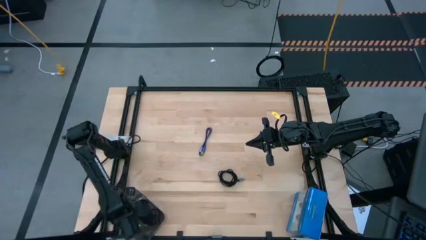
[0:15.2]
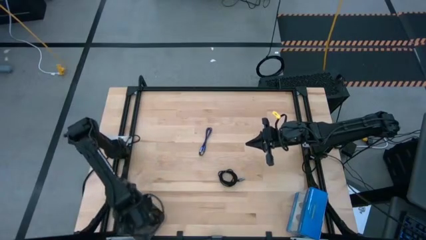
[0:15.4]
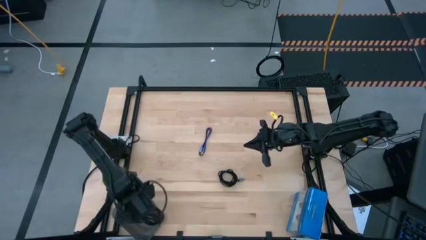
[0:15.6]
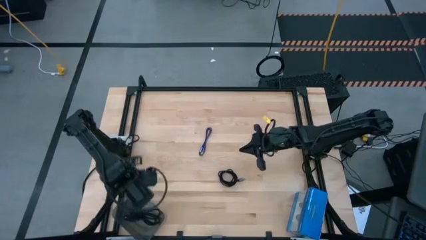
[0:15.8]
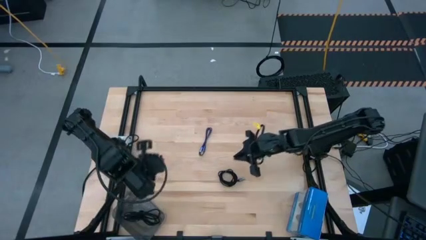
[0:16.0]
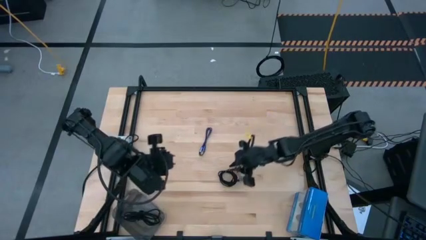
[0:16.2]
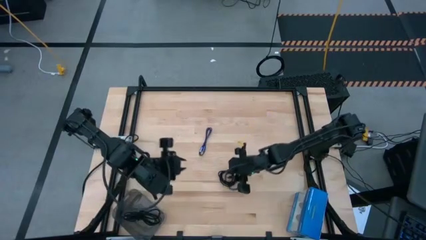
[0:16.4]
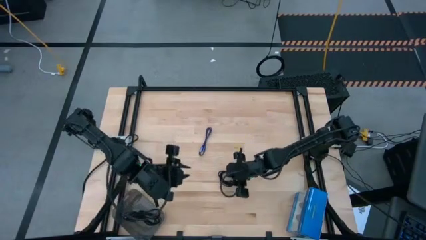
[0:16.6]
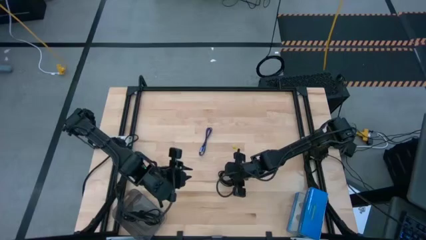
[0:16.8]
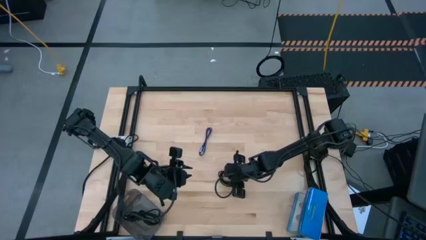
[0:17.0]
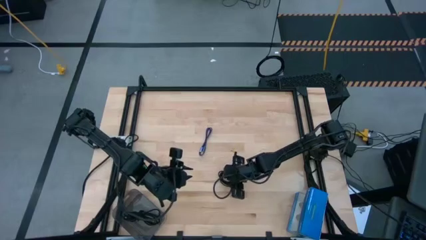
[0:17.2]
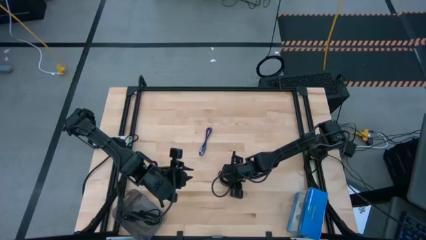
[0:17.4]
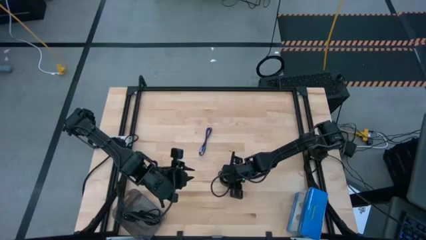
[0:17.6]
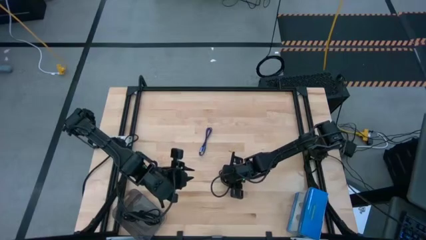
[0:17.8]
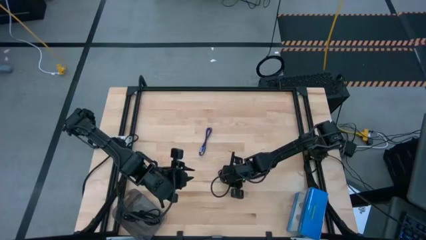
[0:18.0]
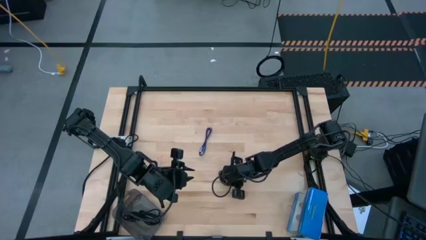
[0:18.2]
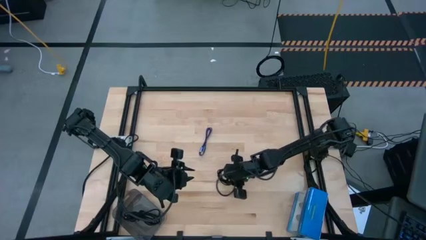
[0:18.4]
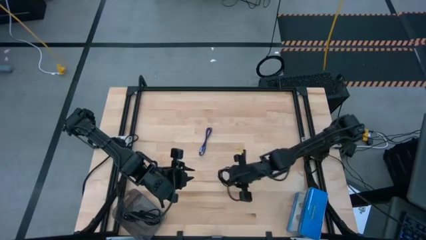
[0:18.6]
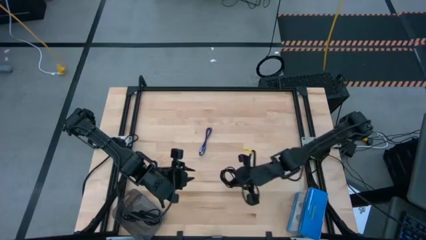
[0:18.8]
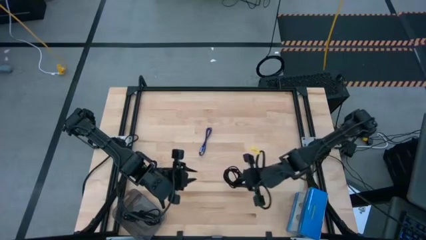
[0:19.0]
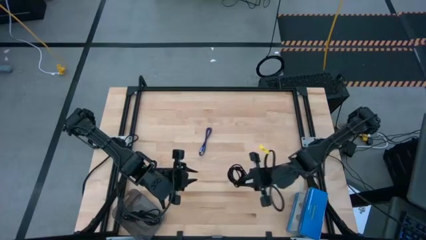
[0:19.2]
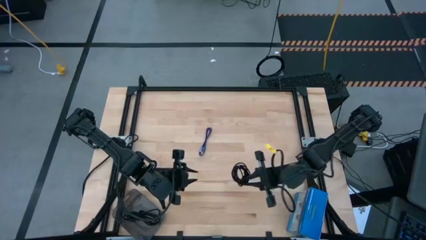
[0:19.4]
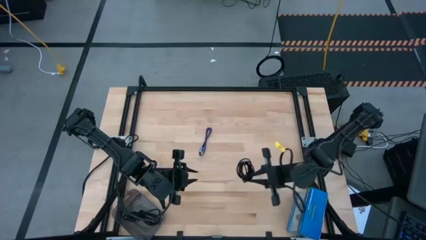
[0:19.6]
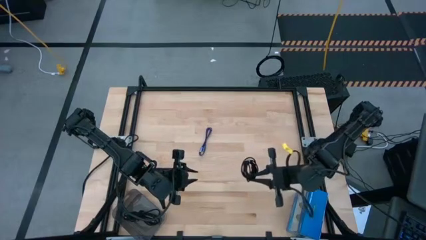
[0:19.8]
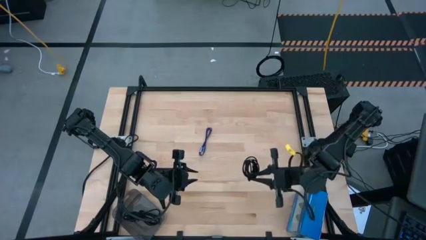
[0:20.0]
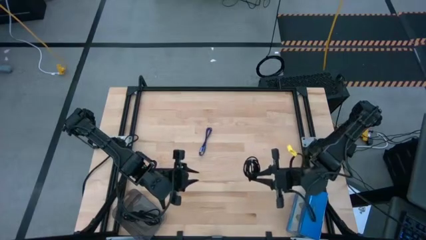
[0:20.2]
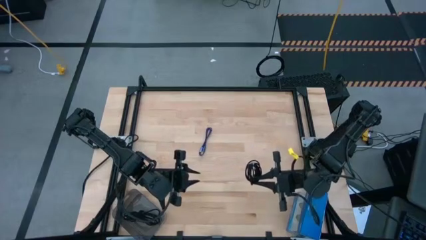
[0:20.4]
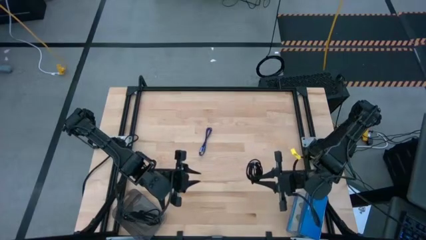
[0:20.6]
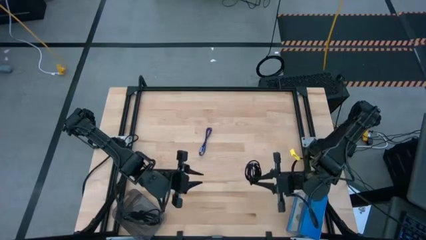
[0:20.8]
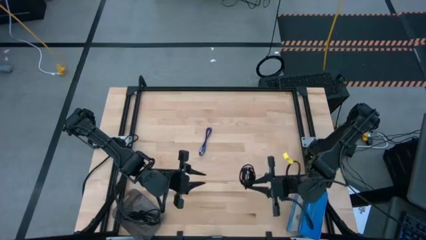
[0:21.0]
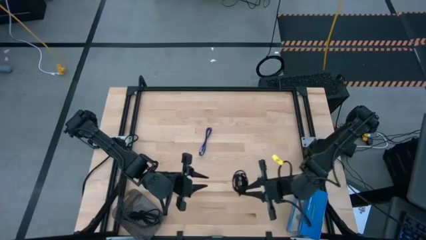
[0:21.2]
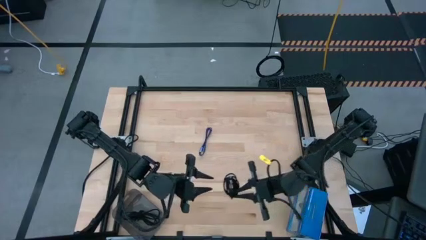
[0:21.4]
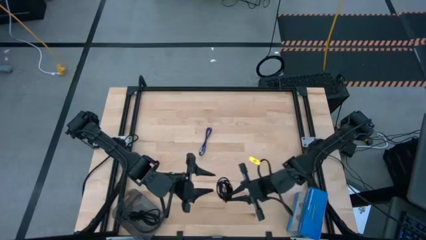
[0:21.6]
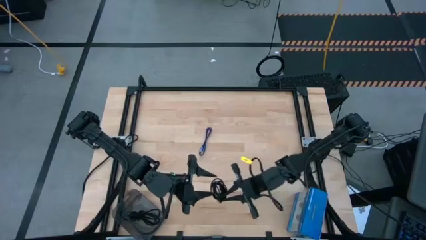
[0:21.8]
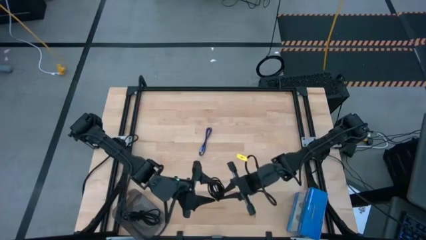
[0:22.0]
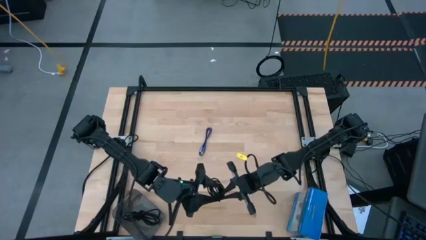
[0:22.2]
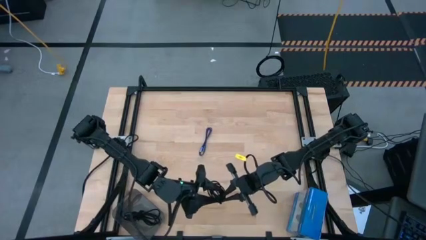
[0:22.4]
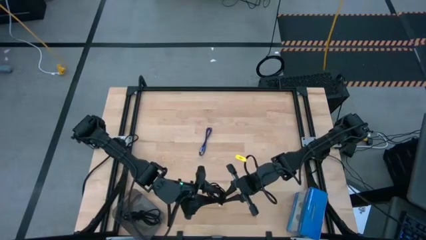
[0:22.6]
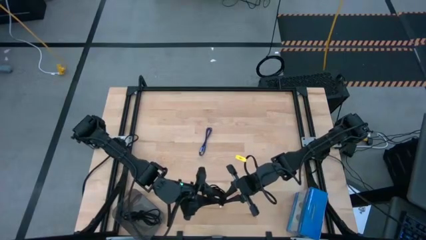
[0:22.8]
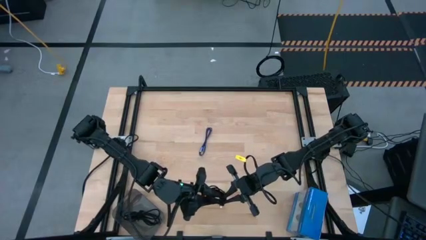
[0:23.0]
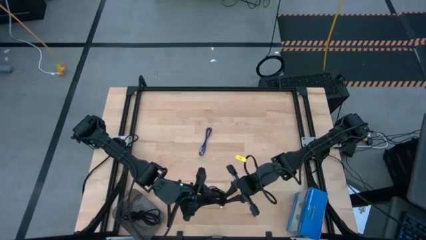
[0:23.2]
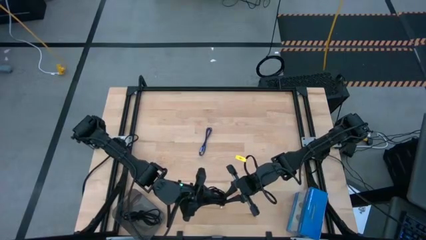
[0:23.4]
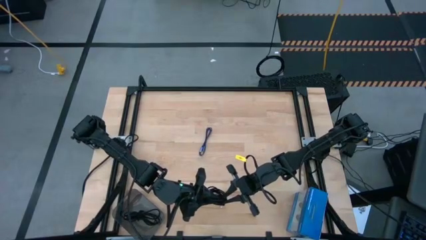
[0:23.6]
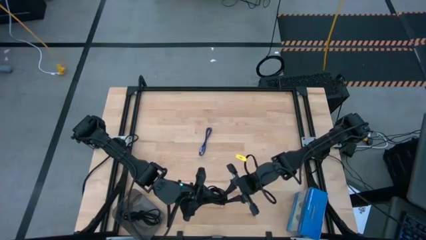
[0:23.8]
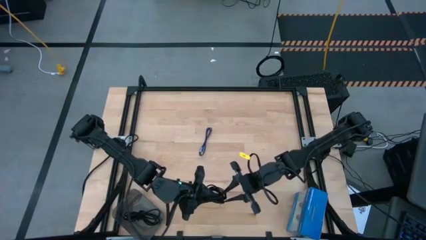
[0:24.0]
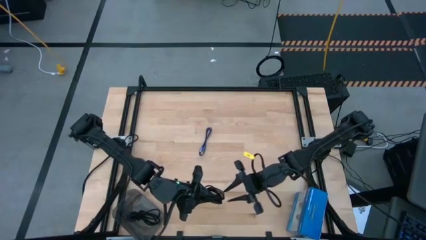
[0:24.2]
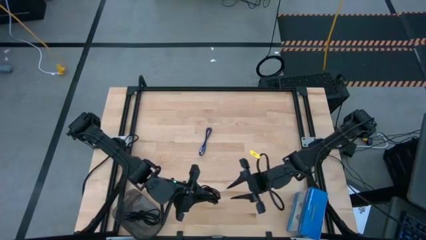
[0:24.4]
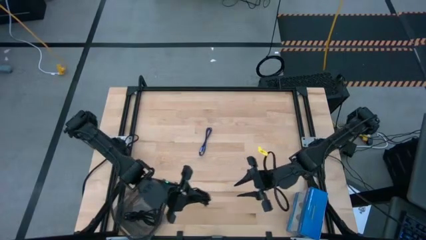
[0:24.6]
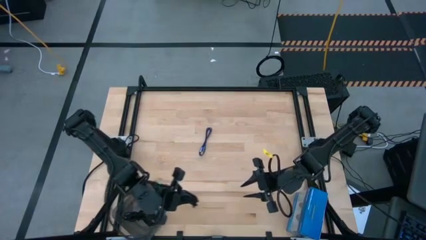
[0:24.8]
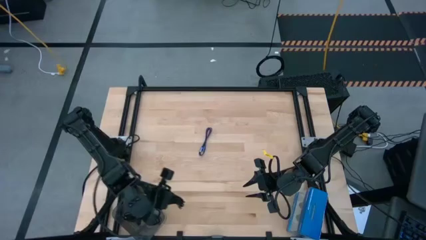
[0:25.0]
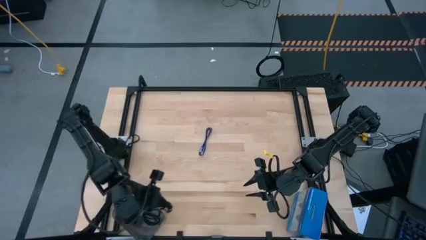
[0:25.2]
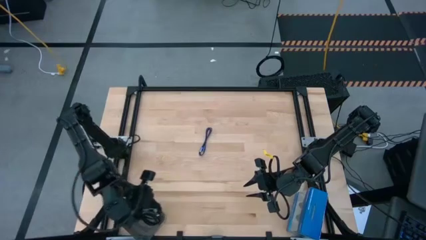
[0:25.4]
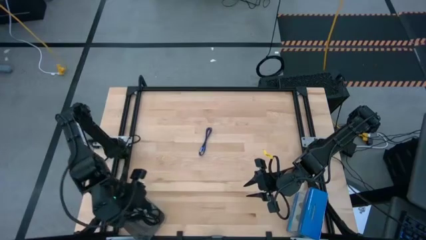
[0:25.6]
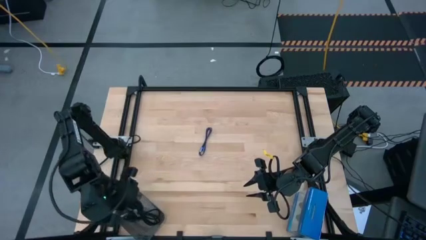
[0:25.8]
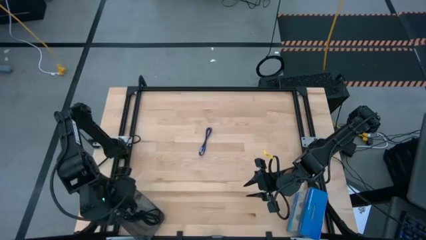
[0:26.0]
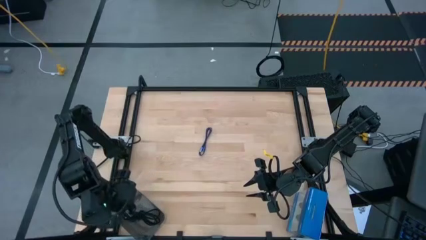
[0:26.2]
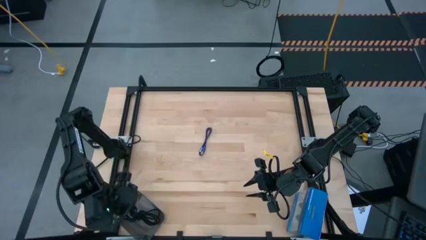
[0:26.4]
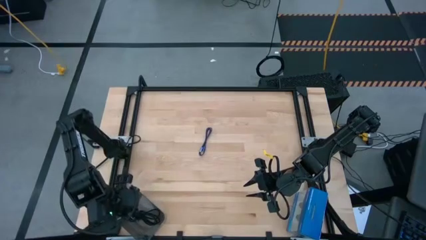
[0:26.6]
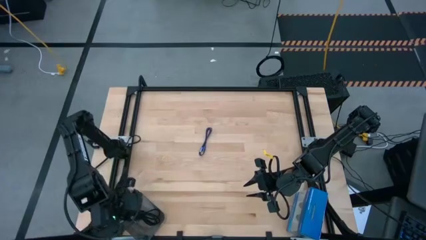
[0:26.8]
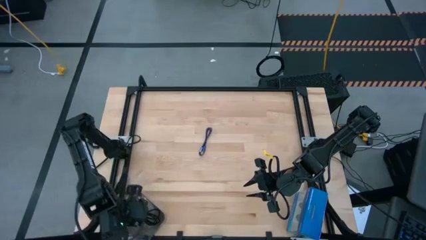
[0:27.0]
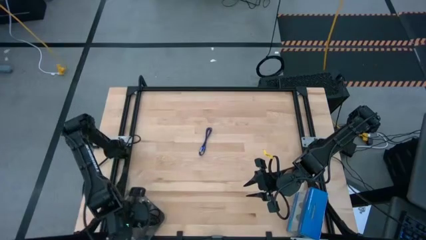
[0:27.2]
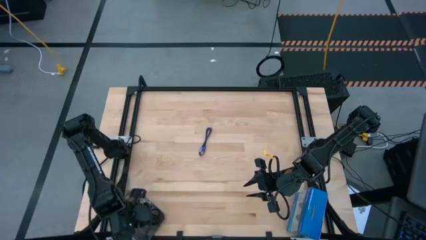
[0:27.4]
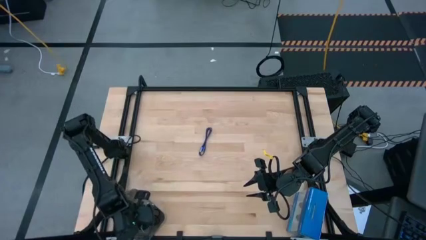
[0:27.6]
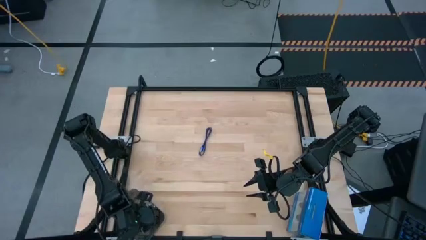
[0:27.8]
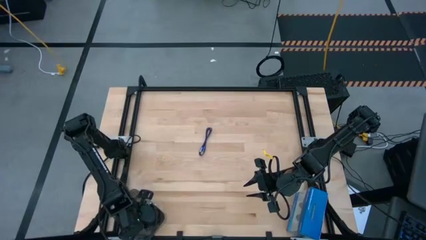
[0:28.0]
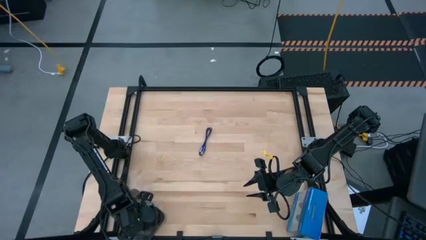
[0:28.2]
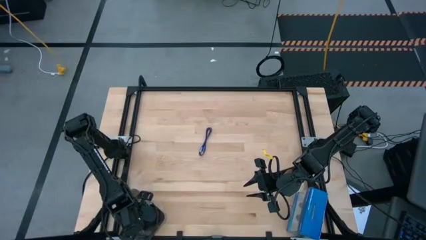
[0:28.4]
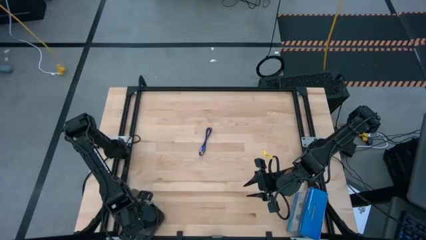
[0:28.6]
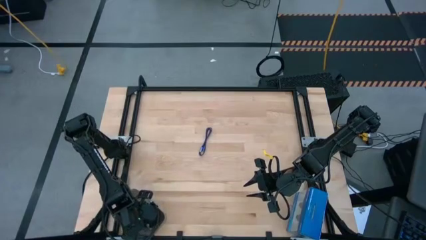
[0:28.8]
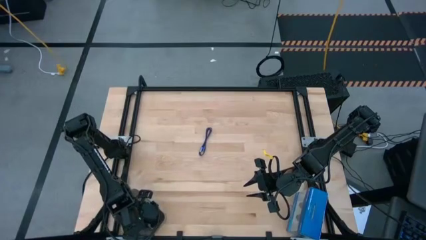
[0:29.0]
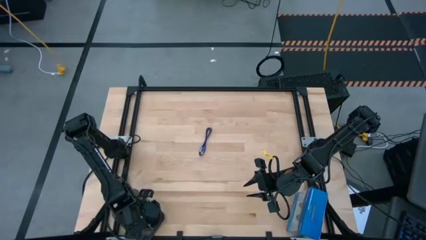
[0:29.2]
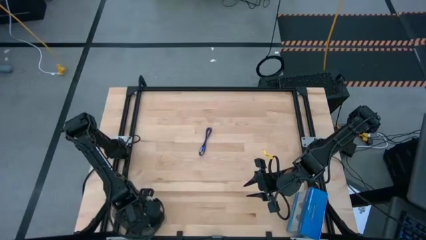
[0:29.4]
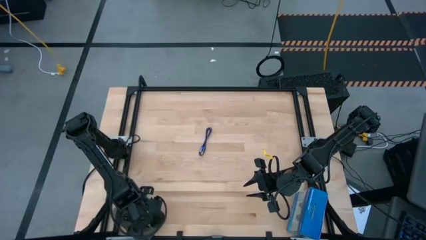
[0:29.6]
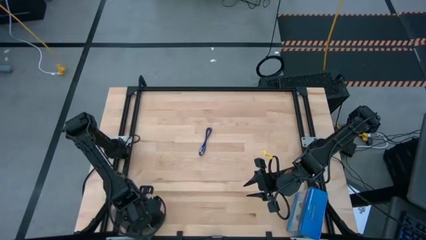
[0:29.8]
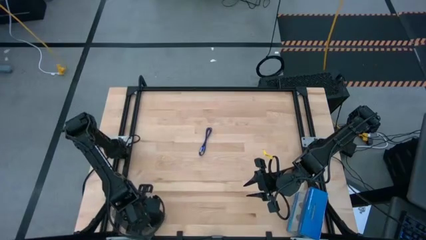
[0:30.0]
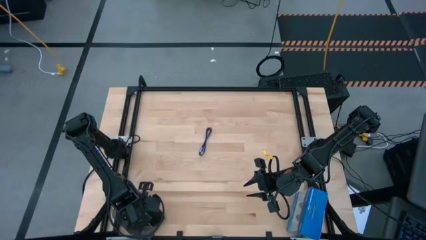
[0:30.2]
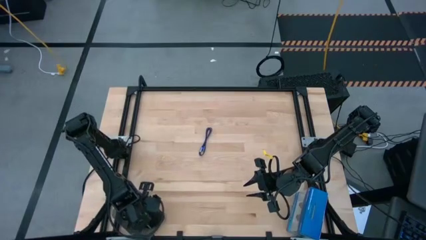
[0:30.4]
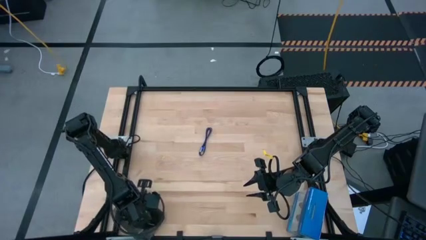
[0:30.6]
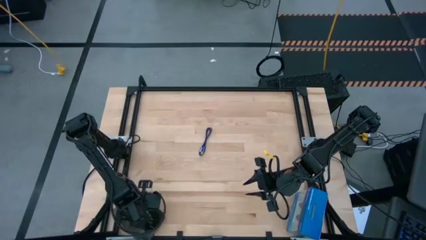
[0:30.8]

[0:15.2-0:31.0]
Task: Pick and place USB-C Cables
Put the black charger cable into the black bin
